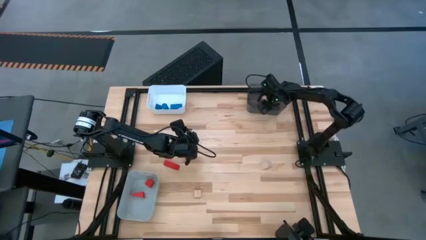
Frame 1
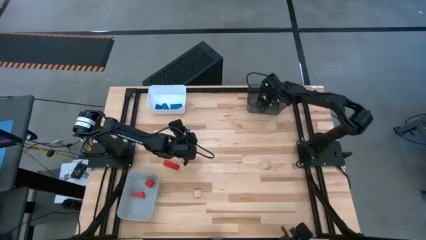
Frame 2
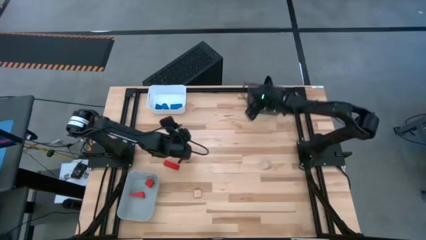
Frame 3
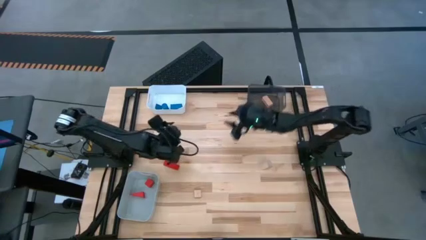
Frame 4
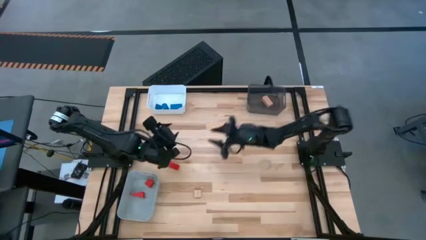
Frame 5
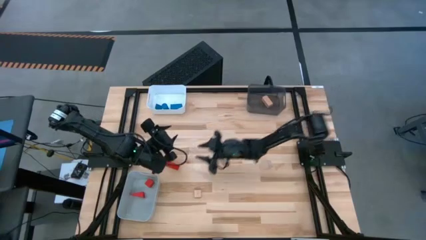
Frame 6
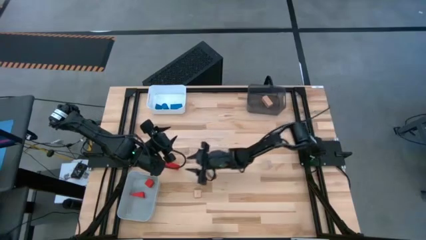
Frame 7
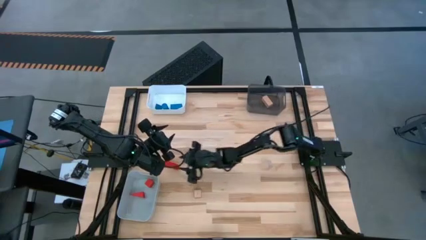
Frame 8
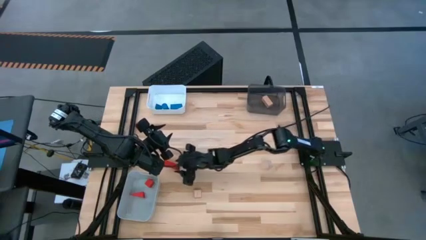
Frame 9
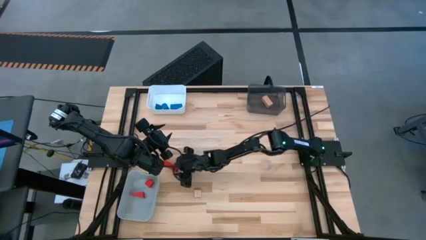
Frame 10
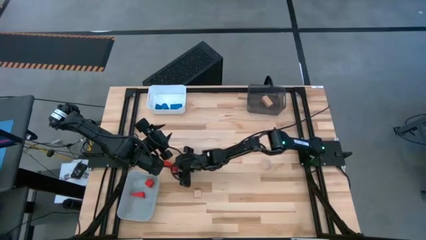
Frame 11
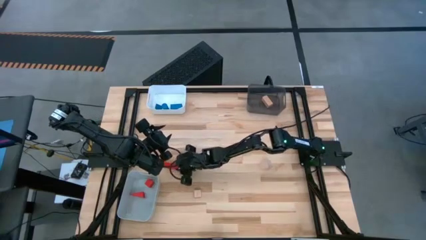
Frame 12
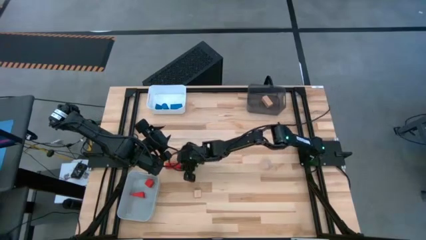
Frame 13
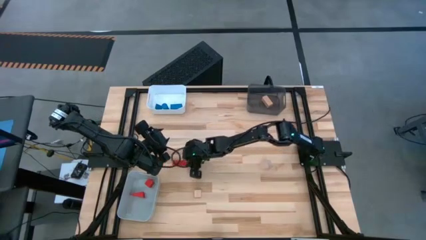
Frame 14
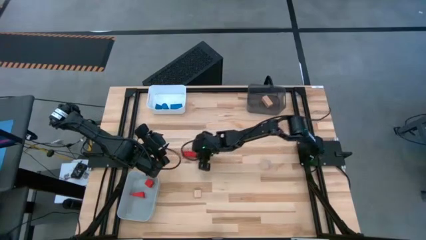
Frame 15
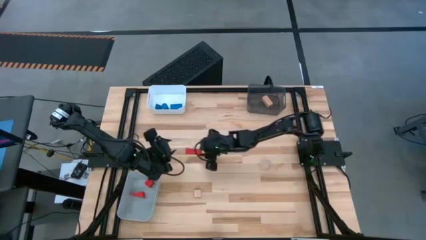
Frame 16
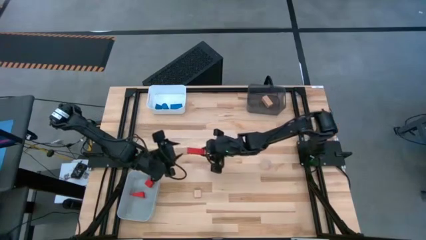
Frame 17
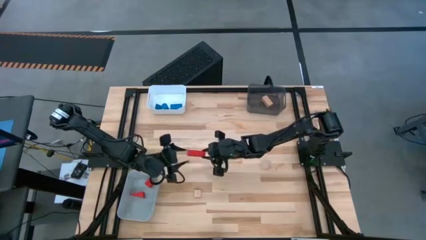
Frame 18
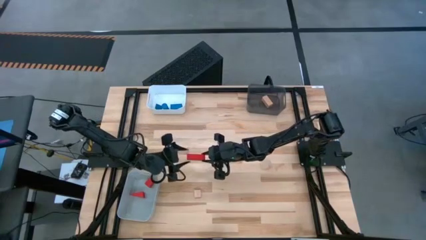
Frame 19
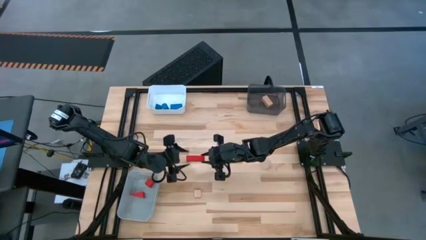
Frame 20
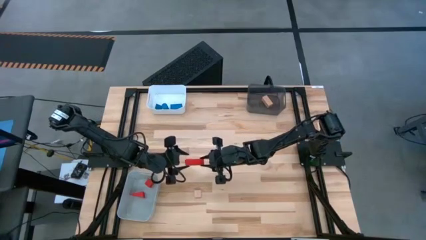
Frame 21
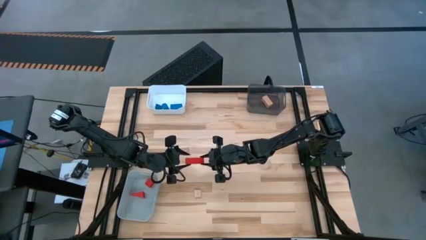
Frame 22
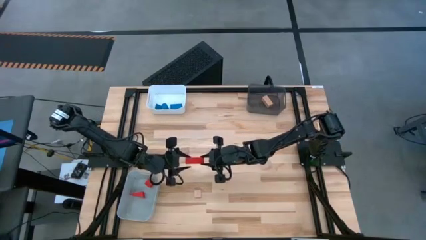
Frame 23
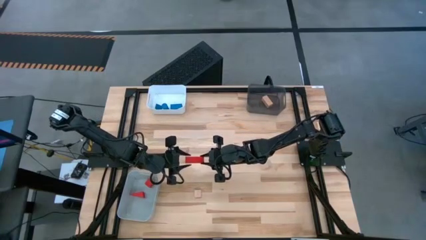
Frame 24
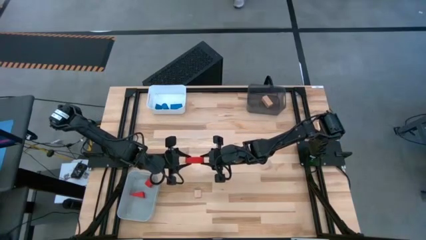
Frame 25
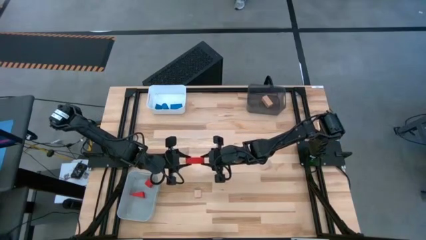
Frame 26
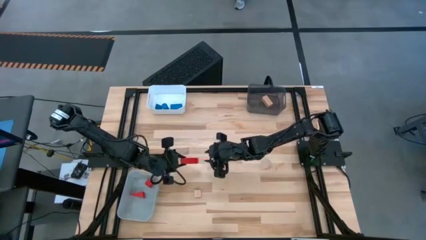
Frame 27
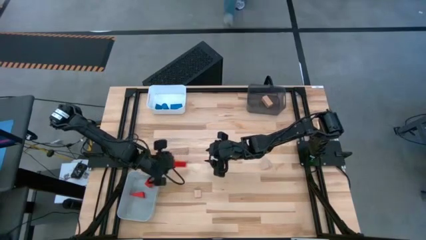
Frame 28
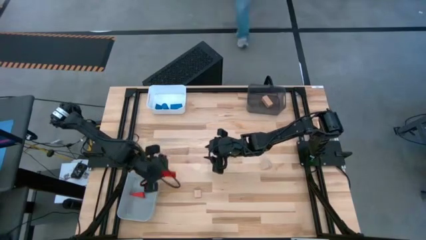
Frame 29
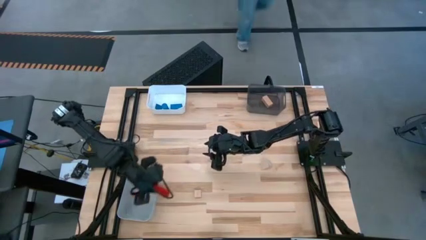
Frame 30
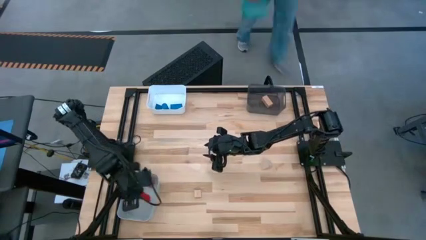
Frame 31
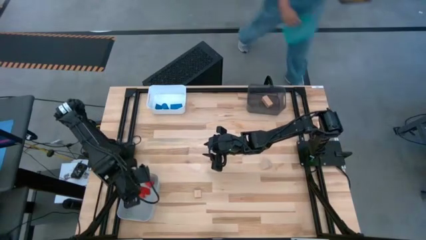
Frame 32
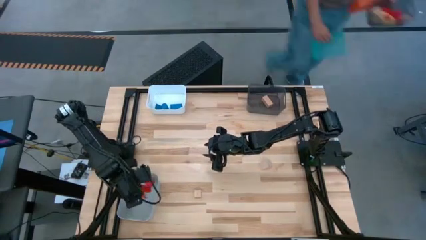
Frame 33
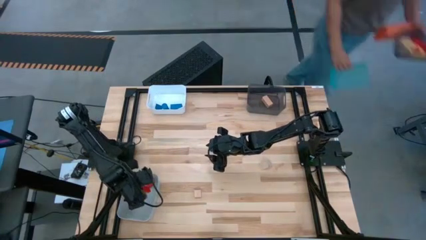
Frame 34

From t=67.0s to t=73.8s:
Task: Sort & place blocks by color
Put the red block into the gray bin

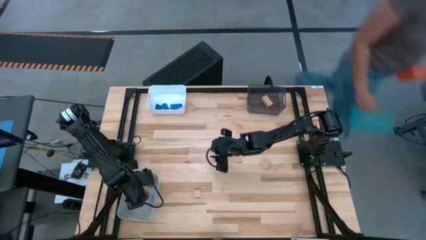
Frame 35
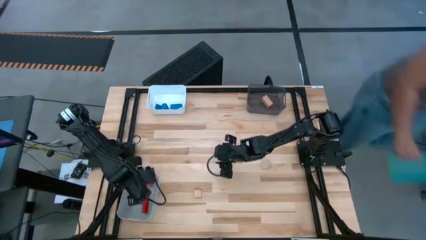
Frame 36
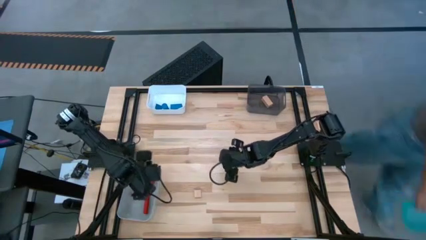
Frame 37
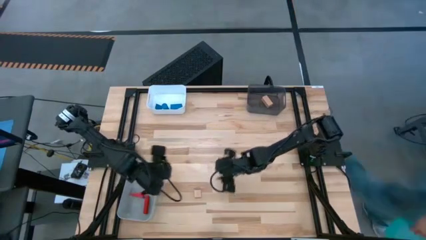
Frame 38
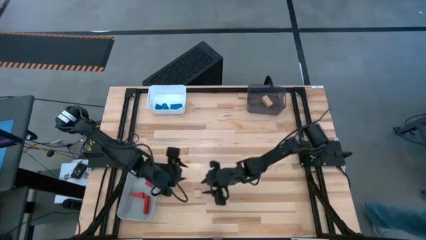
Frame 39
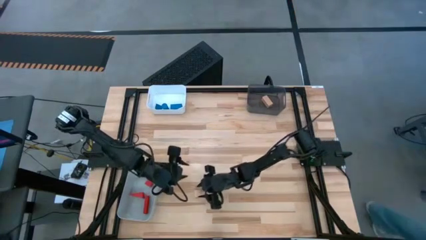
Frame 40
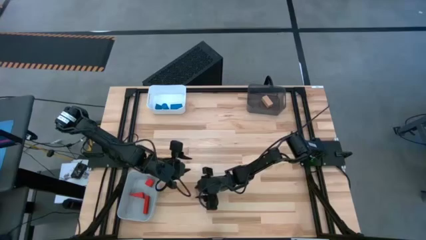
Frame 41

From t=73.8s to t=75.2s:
Put the bottom brown block into the black bin

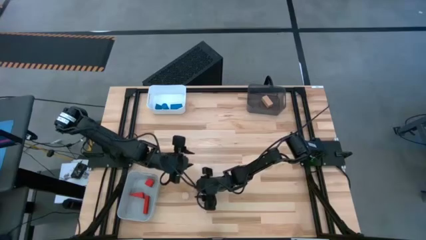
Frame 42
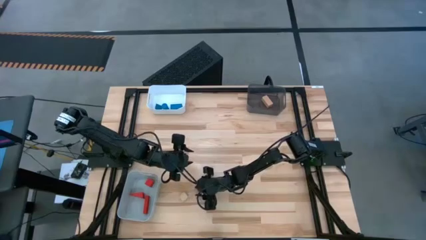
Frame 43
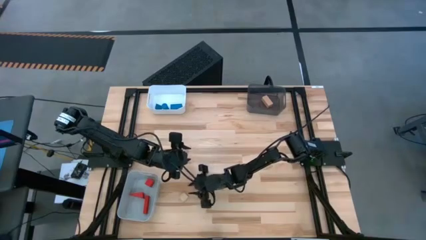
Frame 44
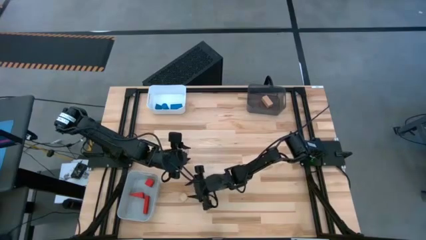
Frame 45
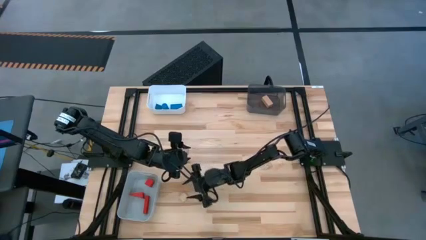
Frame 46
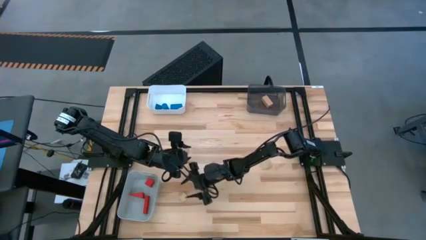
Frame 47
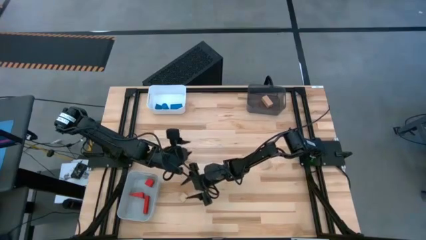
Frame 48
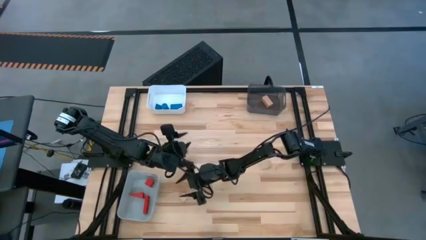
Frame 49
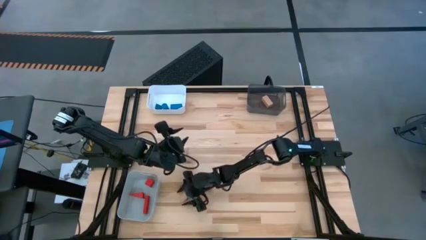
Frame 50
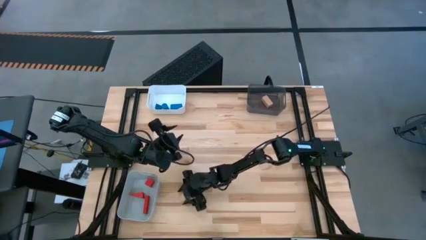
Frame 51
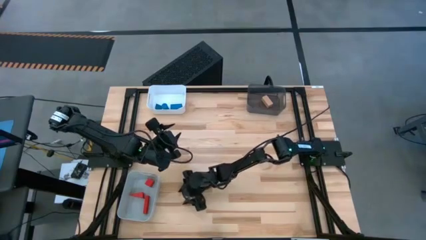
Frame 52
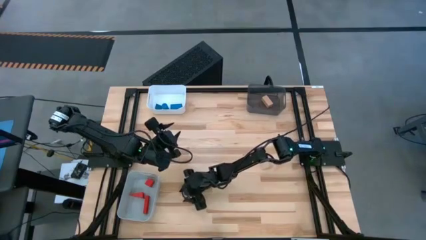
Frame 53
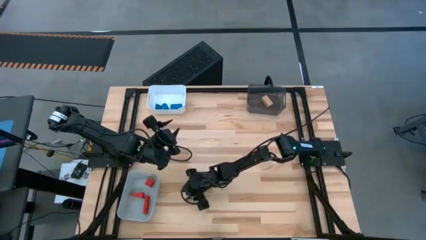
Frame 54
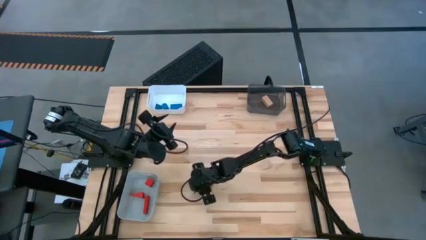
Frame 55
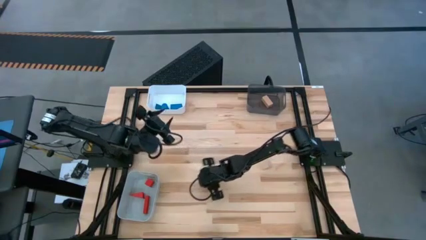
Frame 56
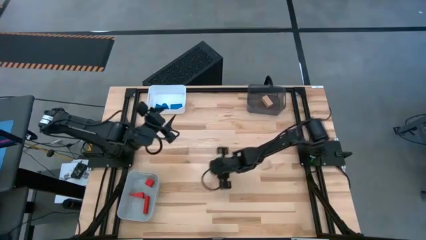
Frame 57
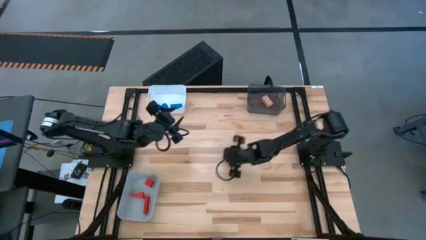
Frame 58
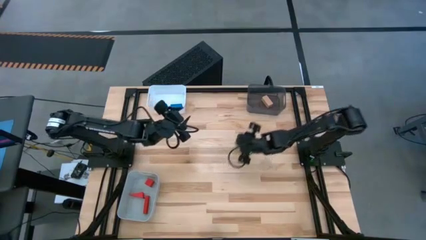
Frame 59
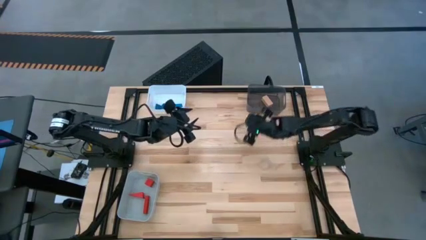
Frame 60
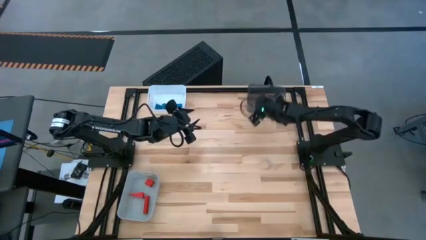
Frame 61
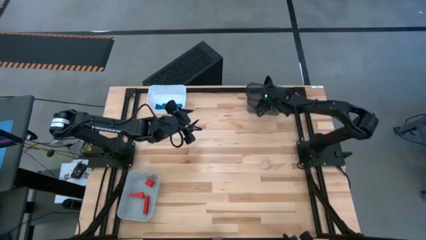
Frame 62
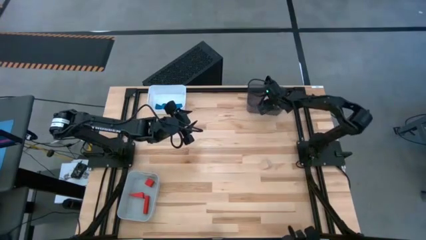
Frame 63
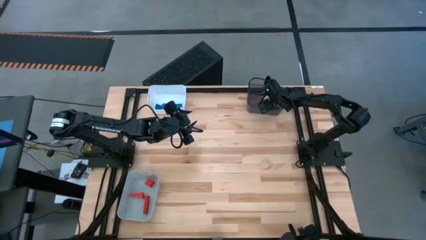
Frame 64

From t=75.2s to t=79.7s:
Put the bottom brown block into the black bin

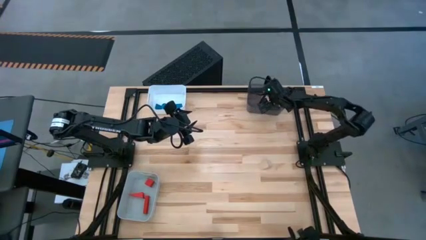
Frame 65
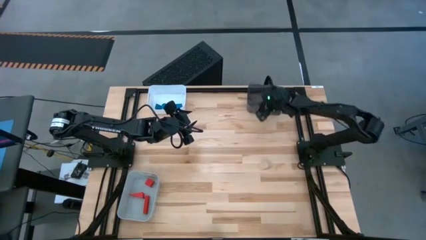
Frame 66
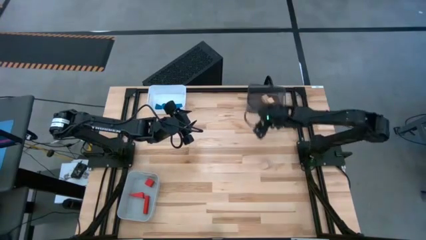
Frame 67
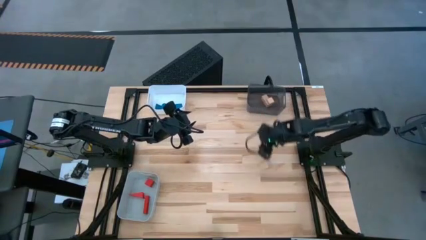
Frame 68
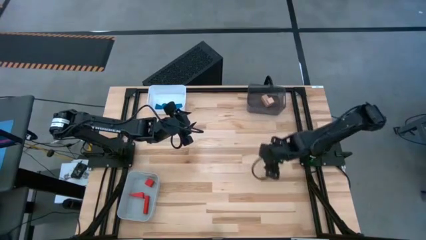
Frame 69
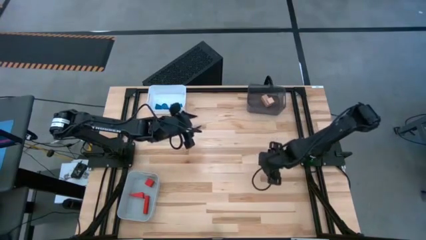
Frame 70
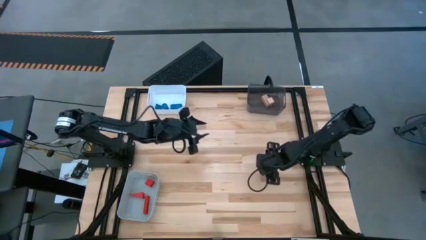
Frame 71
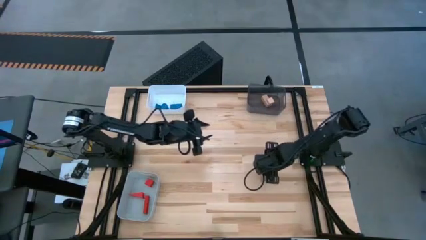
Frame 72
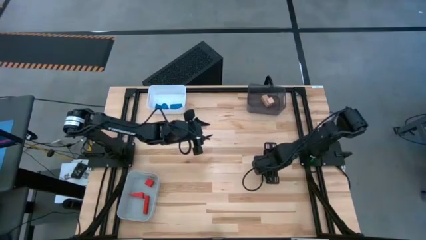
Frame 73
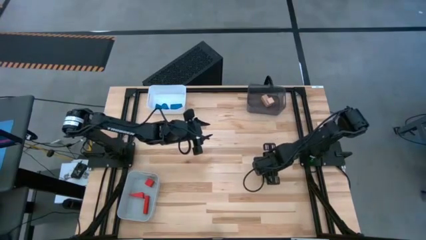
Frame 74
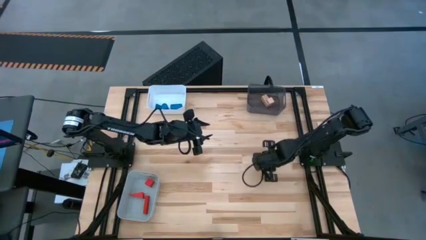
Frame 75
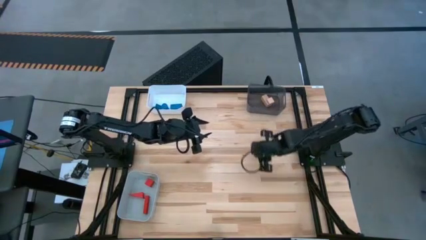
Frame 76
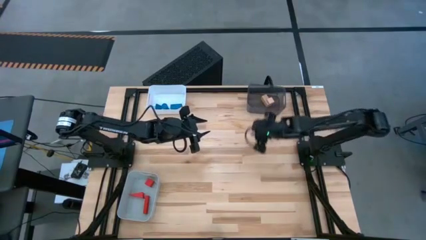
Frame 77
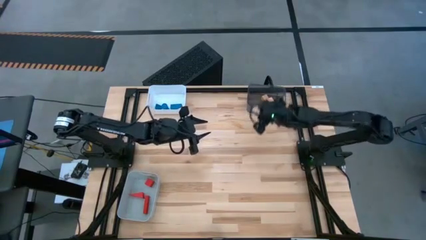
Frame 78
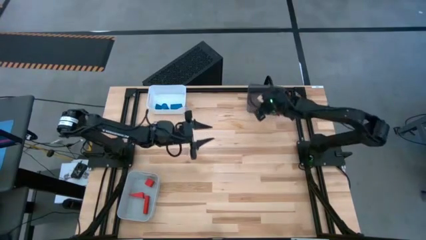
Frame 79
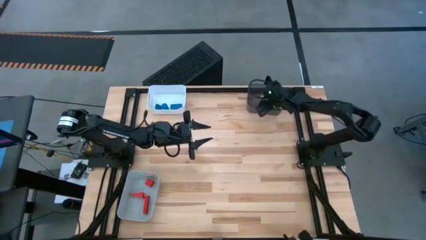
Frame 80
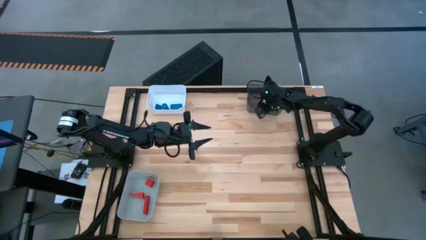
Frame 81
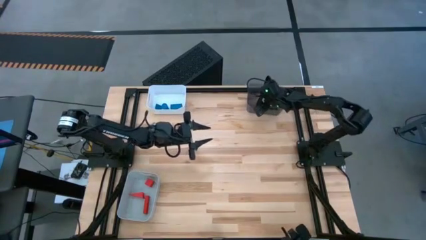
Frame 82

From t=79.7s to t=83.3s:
Put the brown block into the black bin
